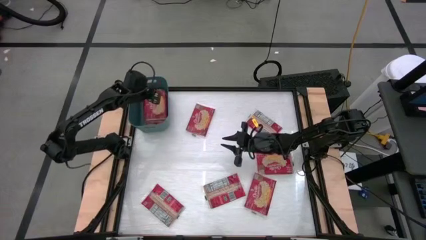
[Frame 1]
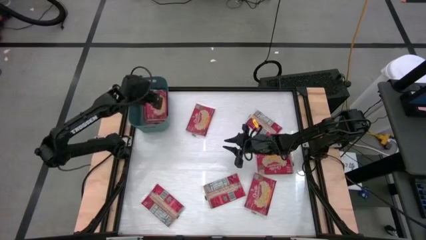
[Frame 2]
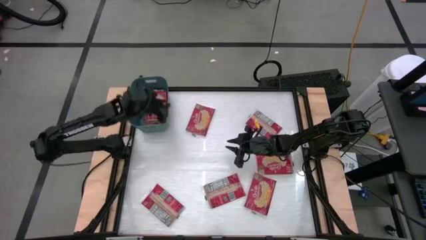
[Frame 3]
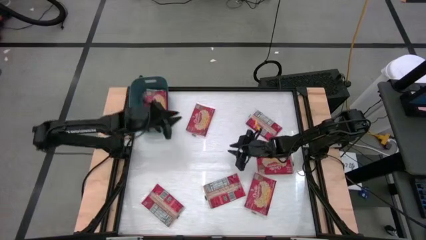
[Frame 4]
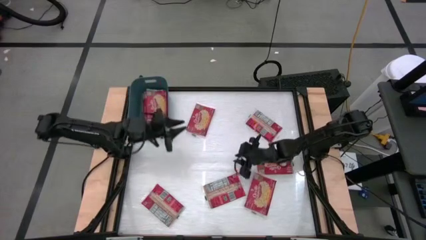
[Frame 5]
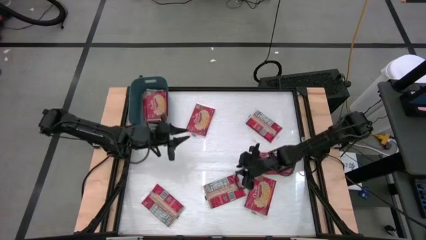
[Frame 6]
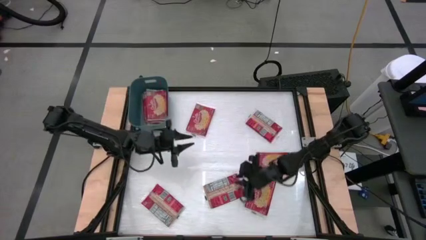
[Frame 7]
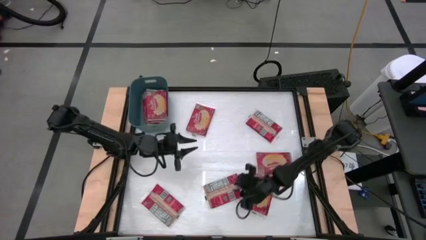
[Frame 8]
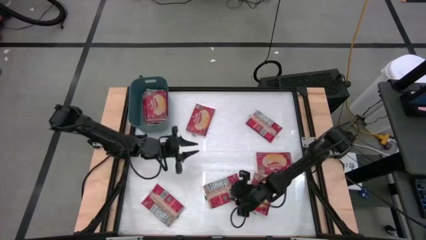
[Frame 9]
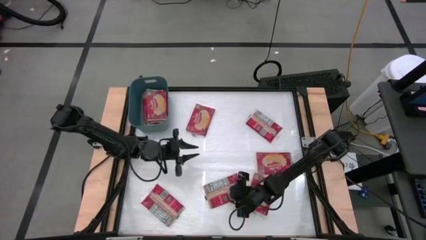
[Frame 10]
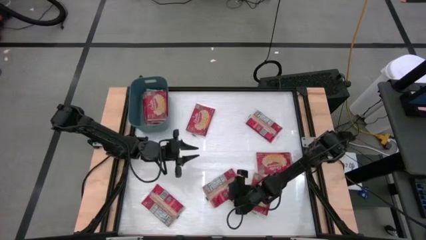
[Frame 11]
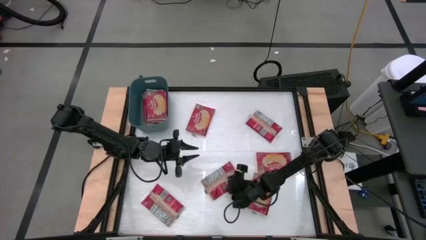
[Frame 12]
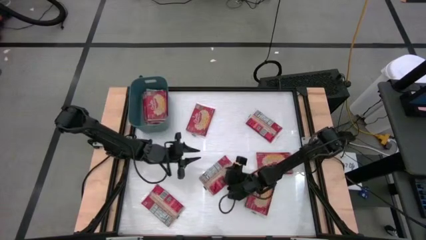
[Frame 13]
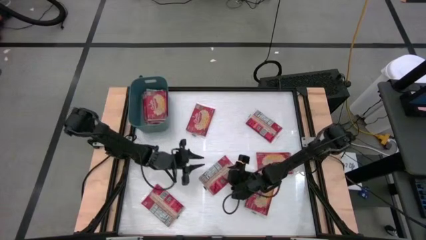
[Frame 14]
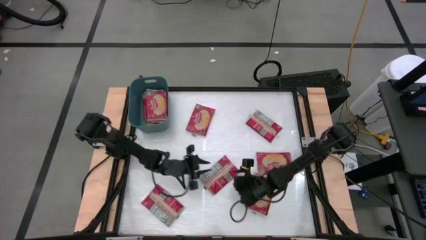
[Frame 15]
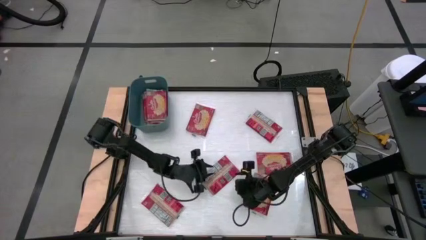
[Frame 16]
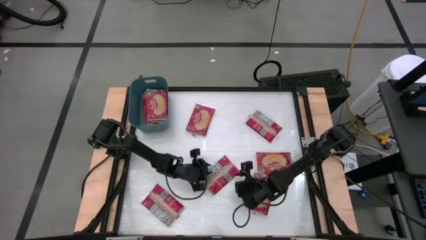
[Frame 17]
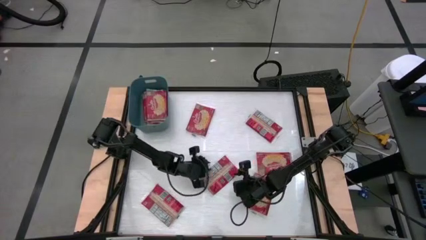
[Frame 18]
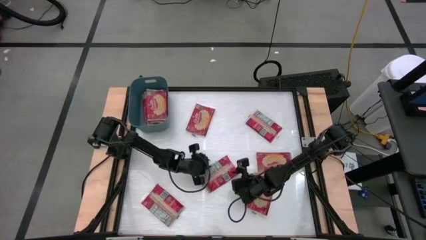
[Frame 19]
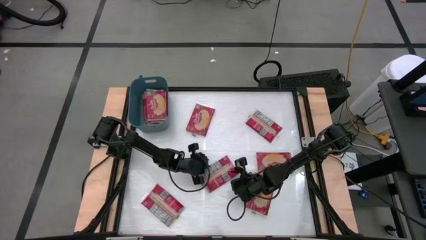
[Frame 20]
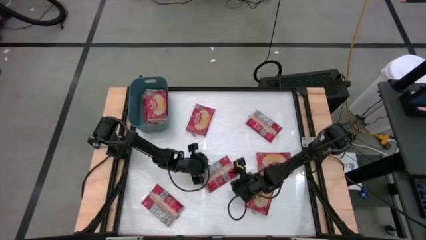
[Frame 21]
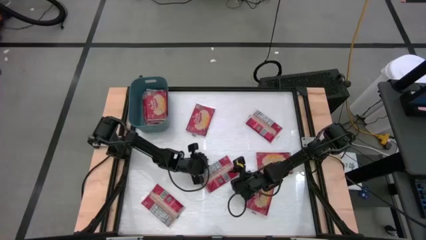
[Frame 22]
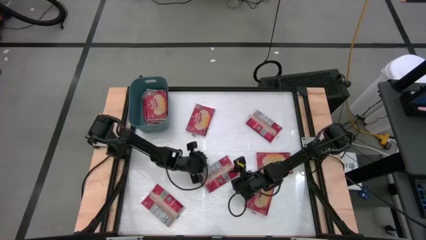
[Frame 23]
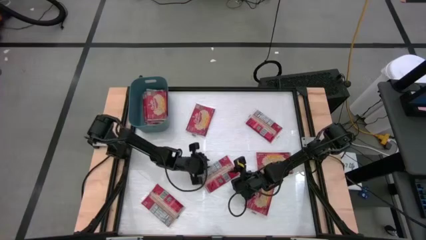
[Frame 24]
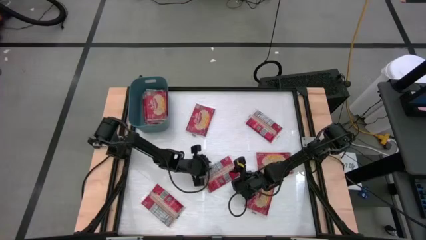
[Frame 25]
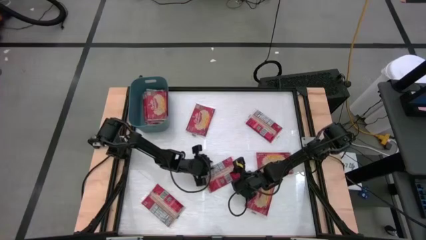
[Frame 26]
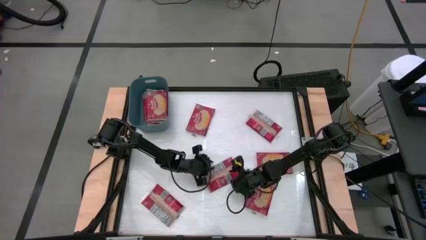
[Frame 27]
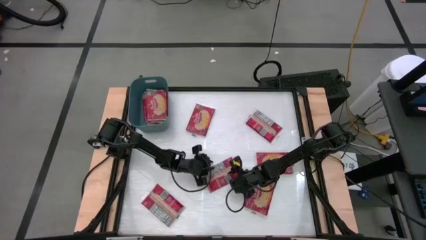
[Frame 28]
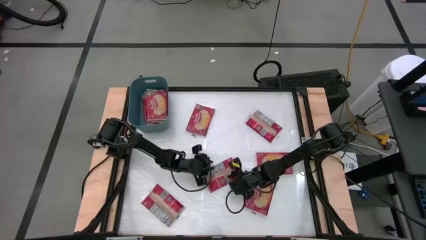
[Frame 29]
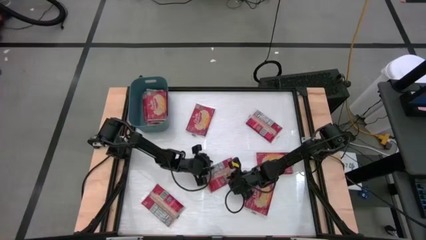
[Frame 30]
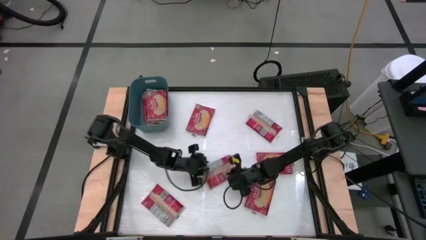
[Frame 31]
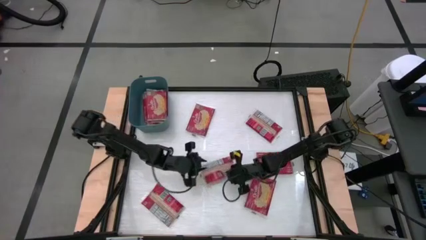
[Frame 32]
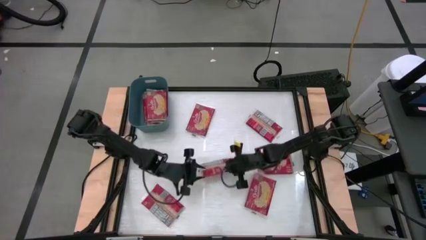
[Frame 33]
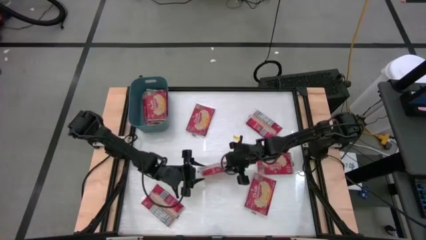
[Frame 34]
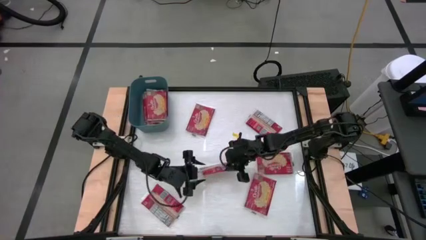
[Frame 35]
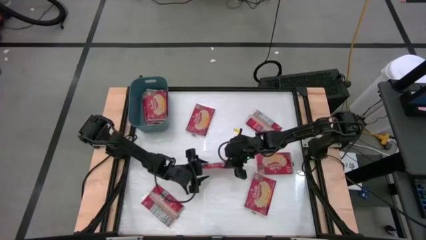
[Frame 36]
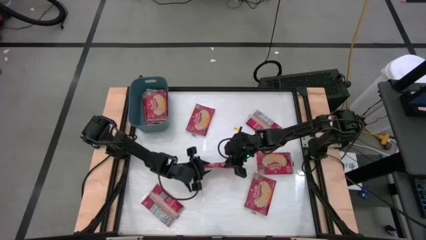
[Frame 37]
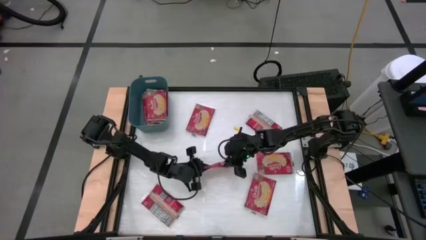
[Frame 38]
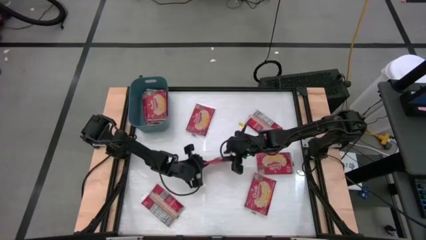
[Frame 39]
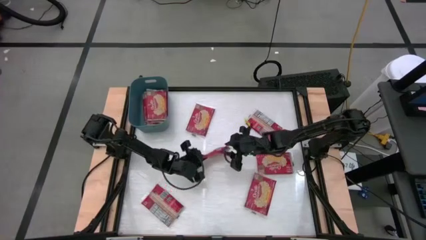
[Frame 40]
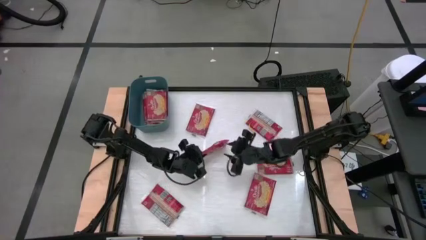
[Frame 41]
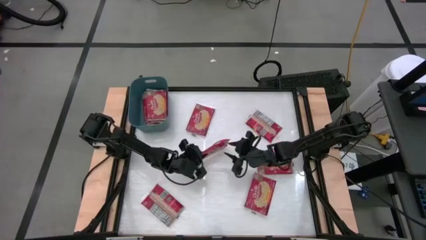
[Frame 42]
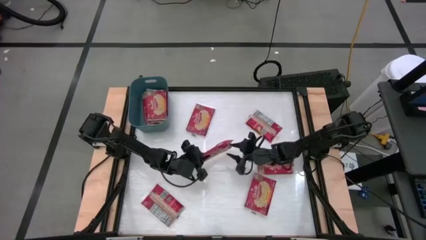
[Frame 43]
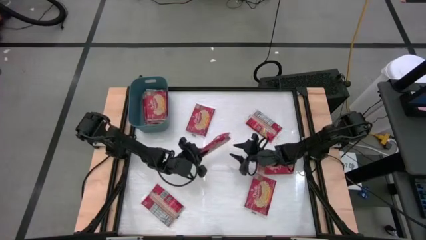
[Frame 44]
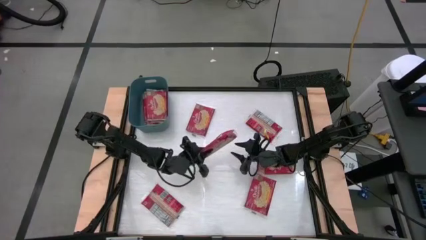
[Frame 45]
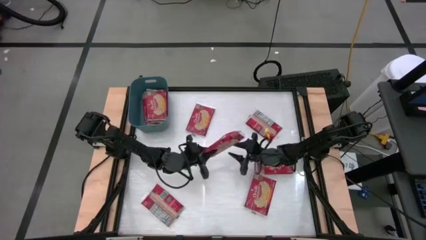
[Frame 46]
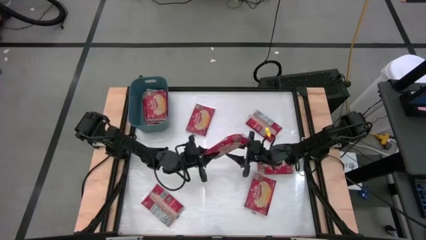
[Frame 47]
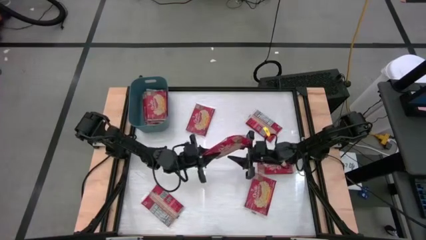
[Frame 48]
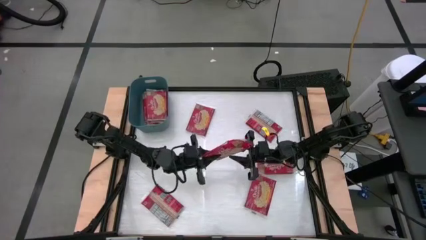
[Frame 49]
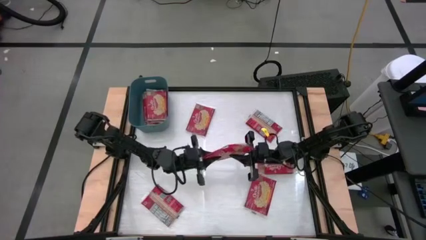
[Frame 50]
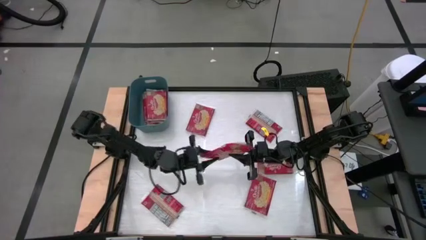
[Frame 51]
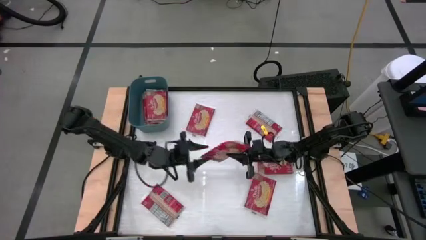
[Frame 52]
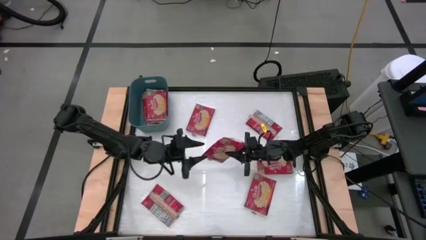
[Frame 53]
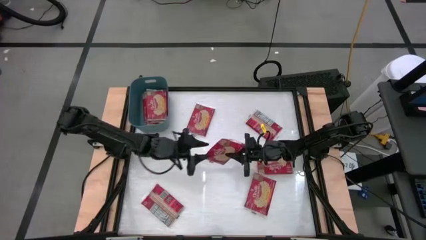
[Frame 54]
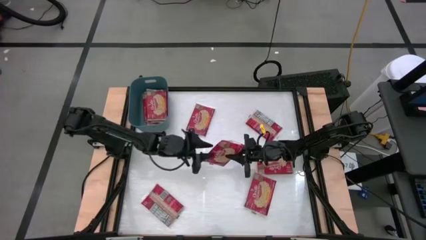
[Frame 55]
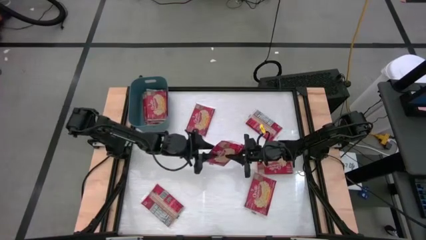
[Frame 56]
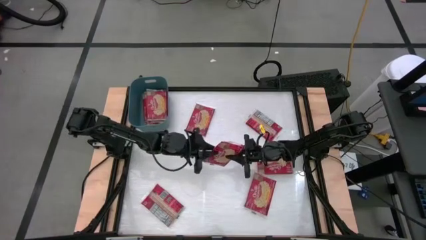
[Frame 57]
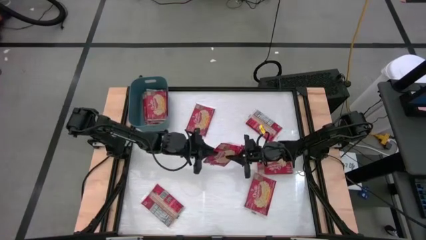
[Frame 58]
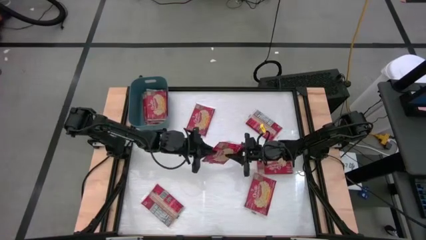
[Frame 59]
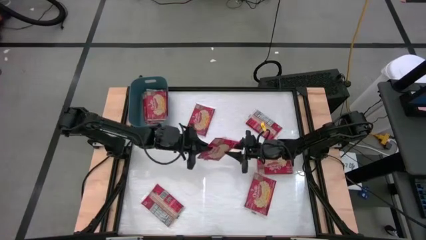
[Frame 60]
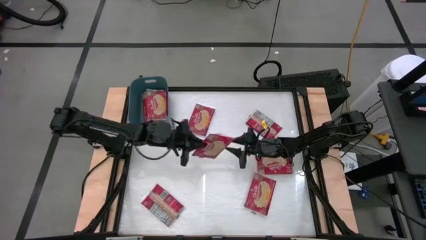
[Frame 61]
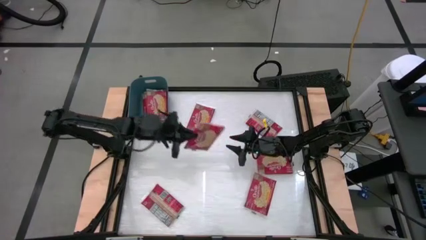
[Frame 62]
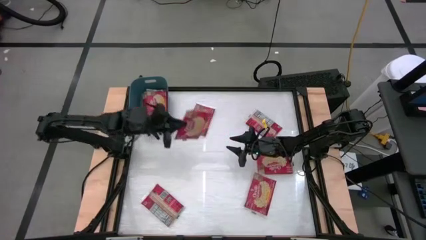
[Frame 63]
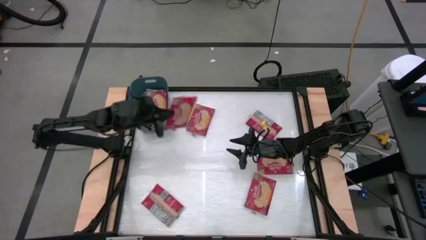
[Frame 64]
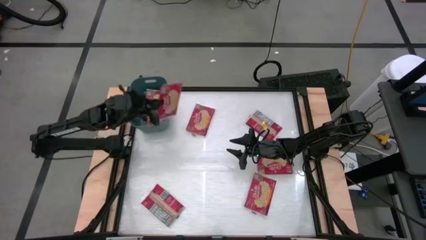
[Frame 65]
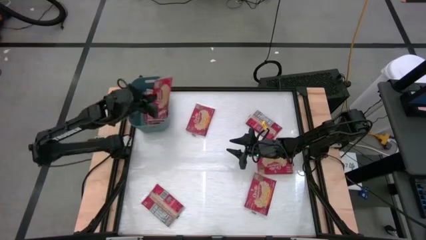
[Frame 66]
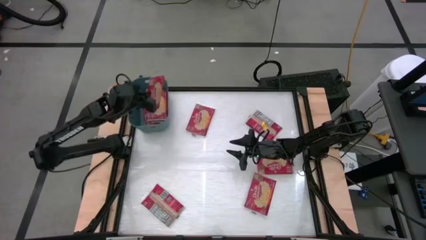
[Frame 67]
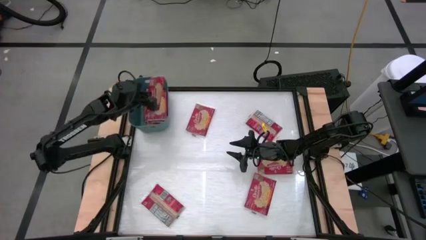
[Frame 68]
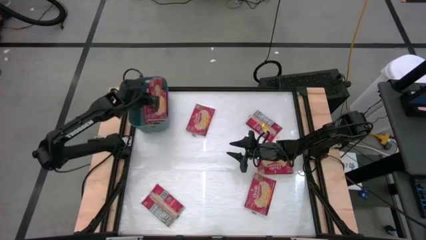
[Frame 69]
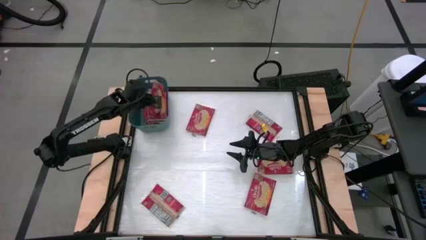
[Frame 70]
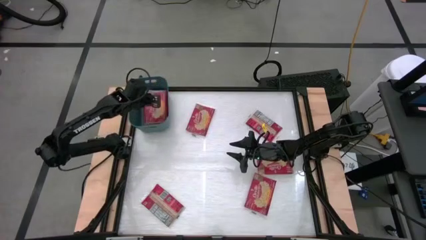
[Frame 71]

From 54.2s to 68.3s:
Task: Sort popcorn bags into baskets
Stack the red popcorn bag on top of the other red popcorn bag into the blue bin

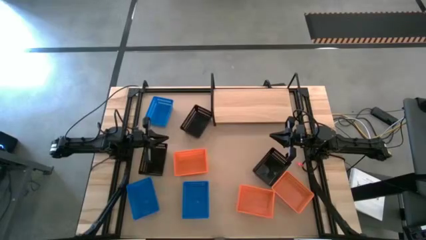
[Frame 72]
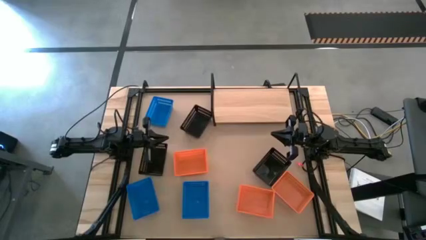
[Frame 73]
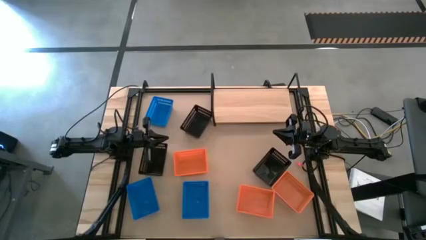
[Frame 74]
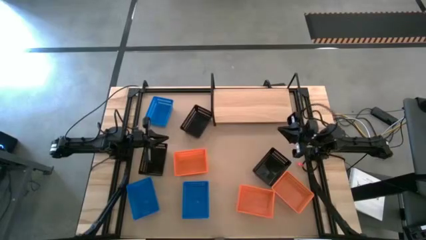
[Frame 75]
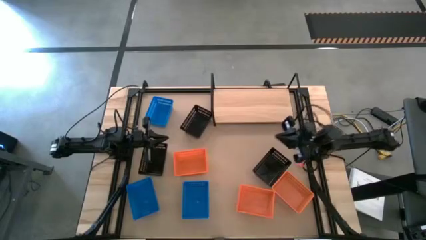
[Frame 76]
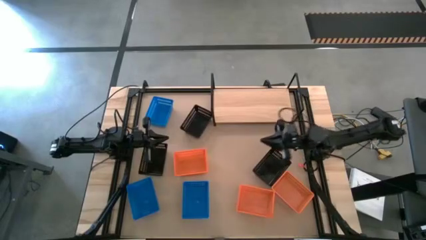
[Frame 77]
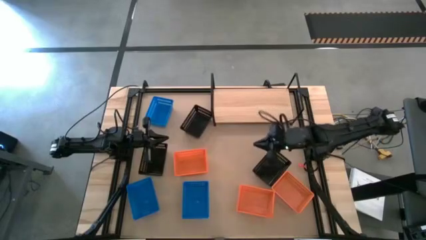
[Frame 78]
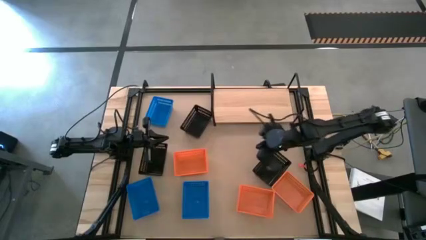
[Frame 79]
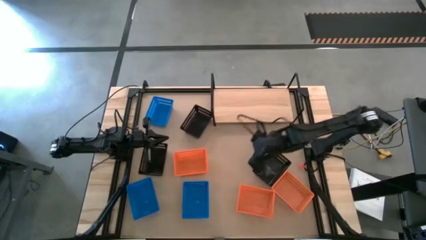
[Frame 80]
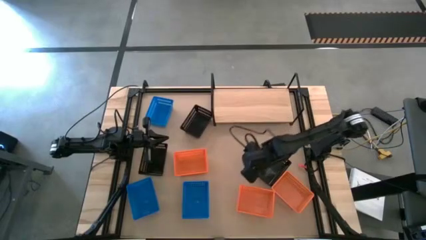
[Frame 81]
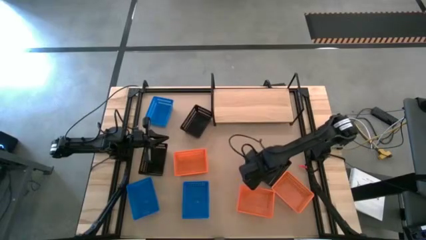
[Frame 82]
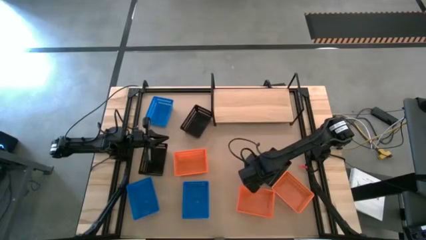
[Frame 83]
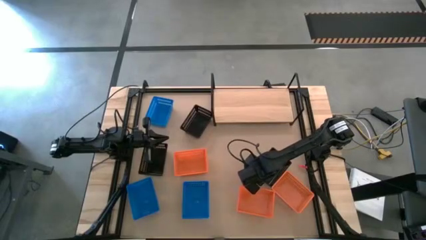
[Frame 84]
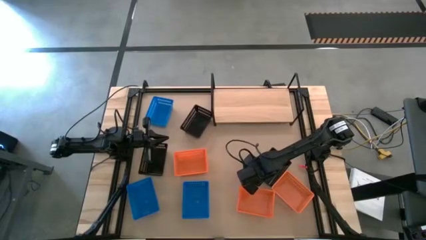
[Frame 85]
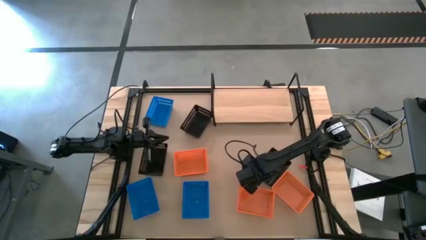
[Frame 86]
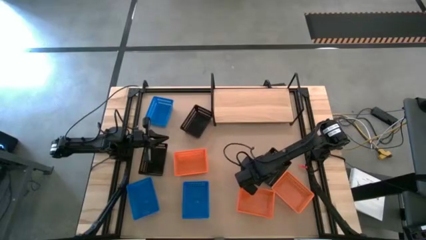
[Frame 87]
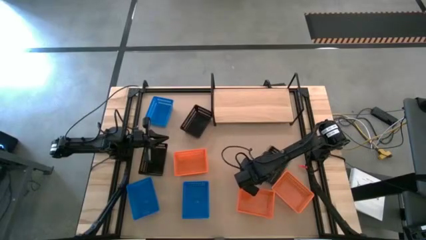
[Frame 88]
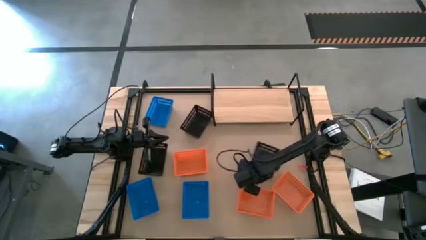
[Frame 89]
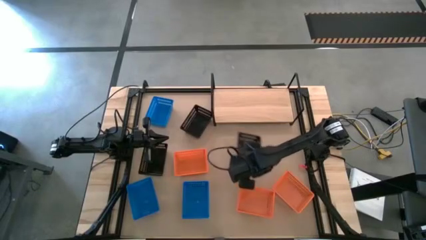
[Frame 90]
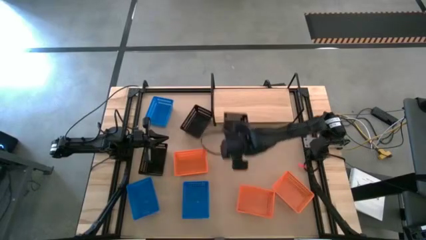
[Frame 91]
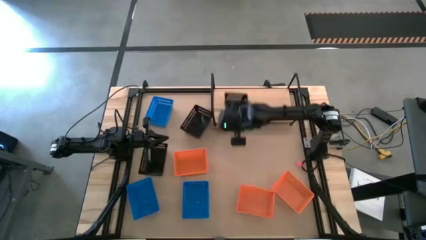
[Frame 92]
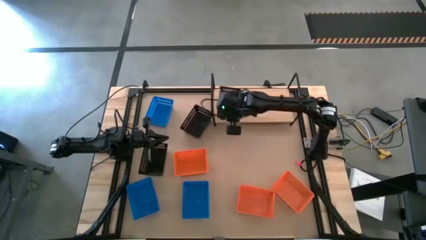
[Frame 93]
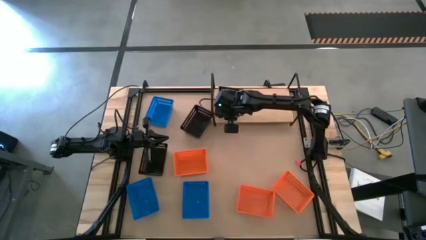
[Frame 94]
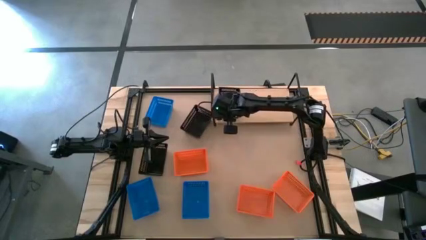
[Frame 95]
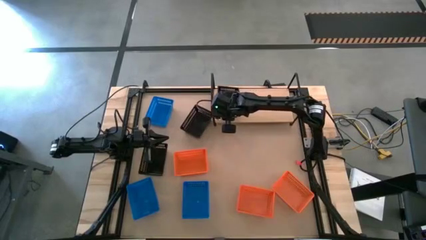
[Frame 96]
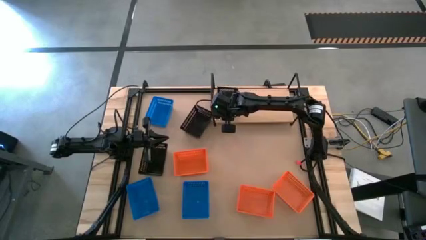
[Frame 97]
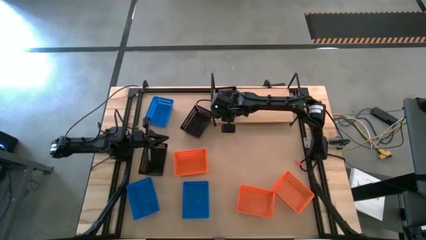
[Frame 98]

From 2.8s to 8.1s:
Task: Stack baskets on shelf by color
Put the bottom right black bin on the shelf
